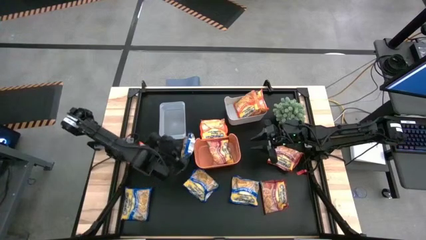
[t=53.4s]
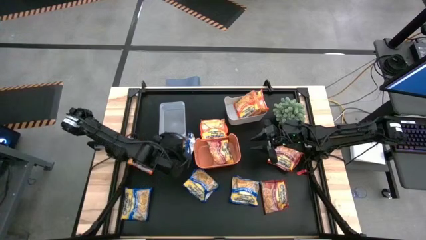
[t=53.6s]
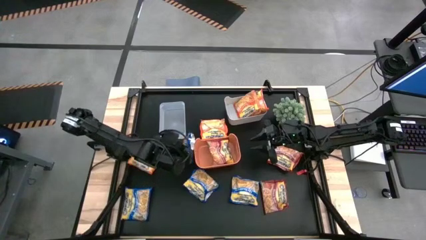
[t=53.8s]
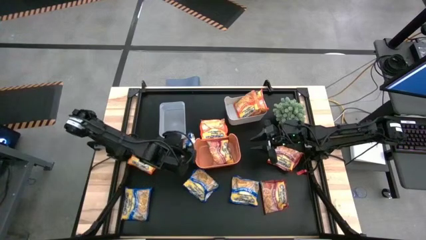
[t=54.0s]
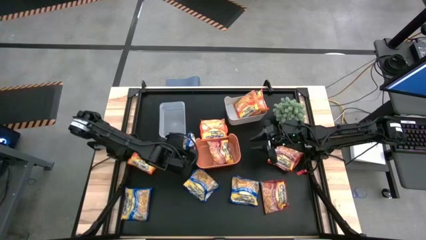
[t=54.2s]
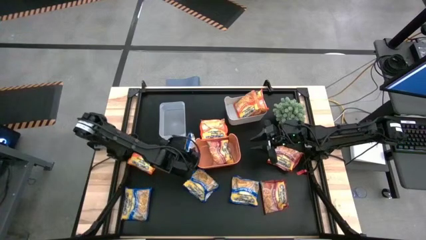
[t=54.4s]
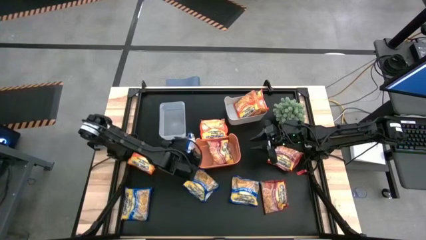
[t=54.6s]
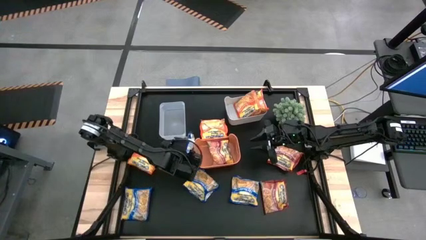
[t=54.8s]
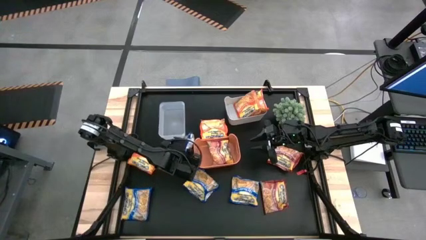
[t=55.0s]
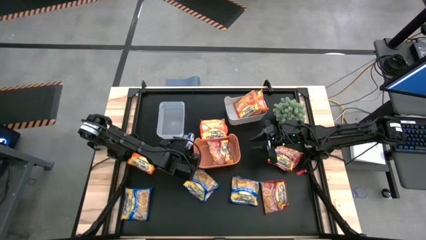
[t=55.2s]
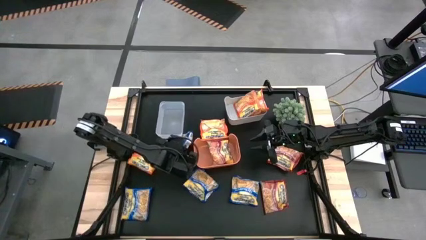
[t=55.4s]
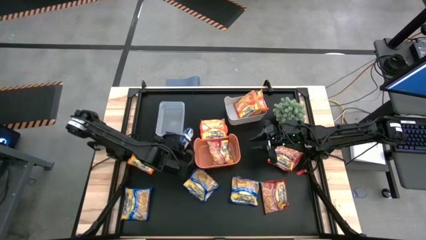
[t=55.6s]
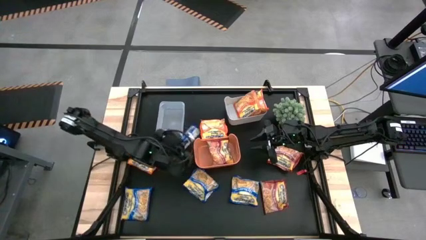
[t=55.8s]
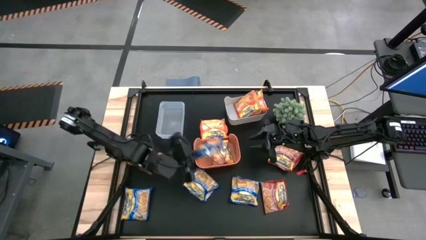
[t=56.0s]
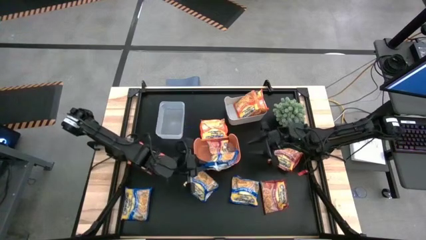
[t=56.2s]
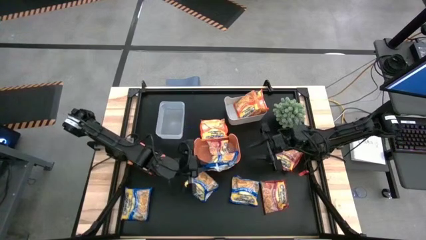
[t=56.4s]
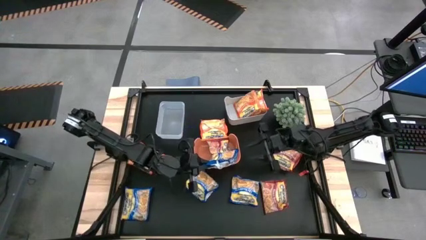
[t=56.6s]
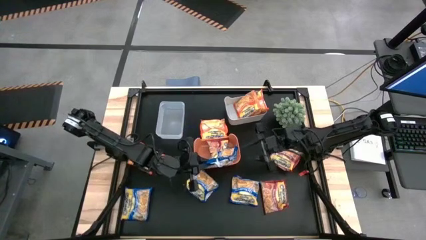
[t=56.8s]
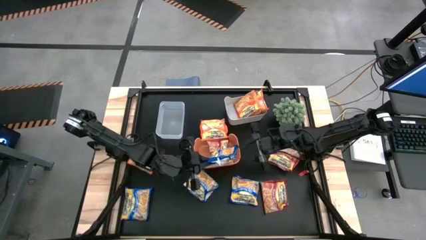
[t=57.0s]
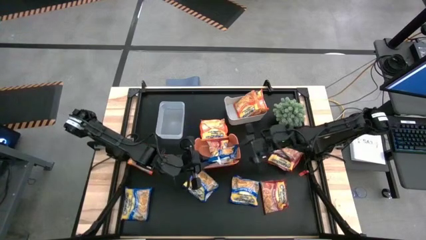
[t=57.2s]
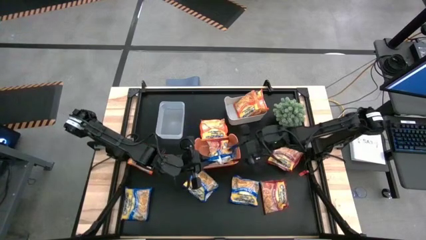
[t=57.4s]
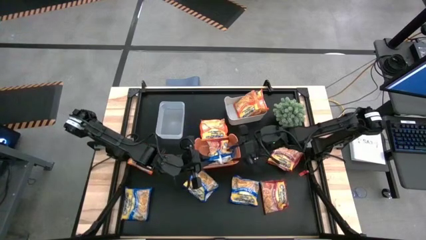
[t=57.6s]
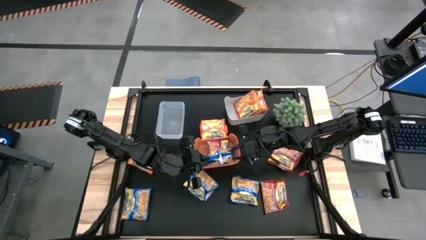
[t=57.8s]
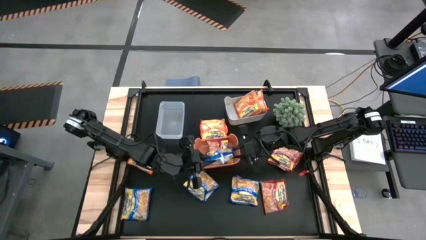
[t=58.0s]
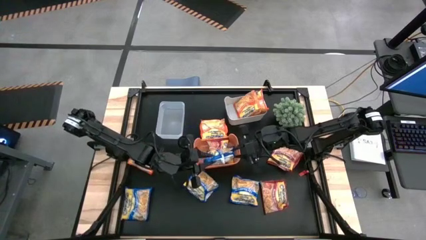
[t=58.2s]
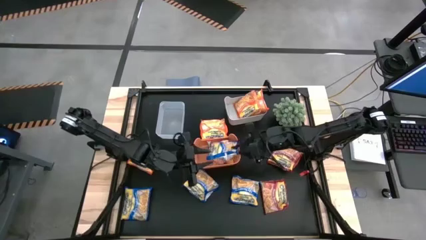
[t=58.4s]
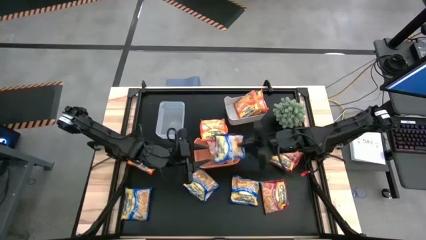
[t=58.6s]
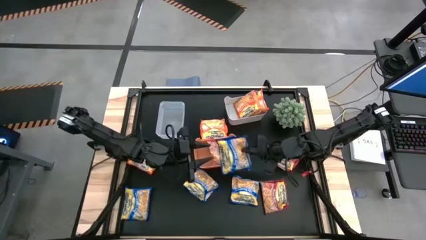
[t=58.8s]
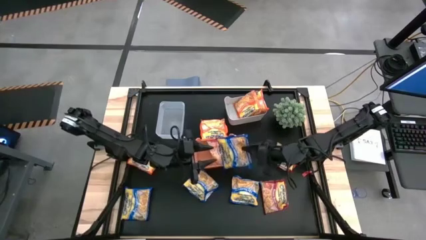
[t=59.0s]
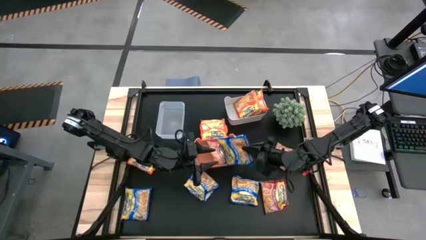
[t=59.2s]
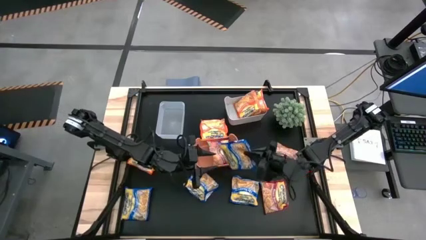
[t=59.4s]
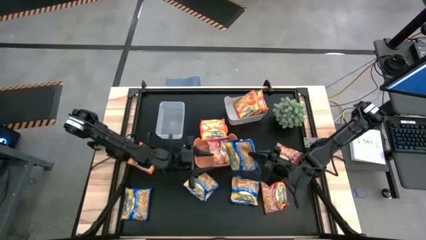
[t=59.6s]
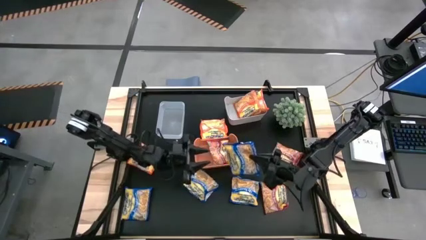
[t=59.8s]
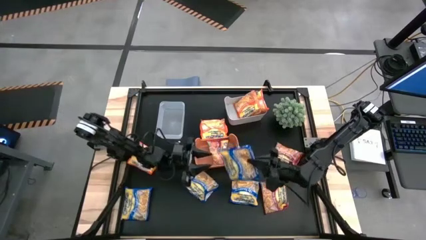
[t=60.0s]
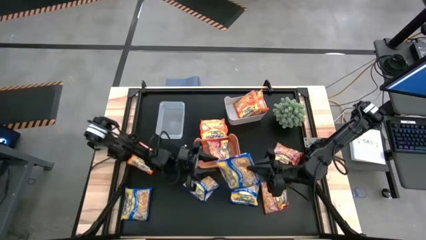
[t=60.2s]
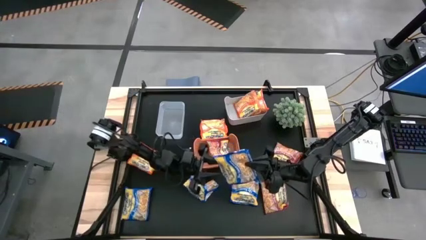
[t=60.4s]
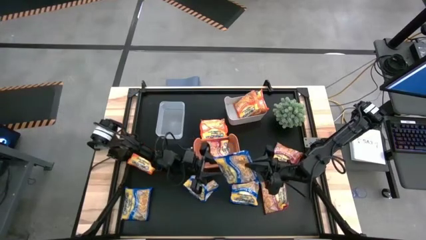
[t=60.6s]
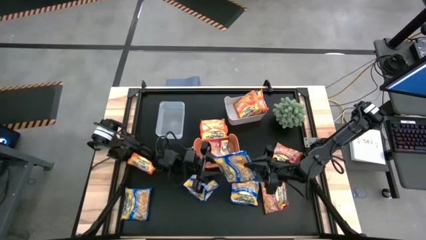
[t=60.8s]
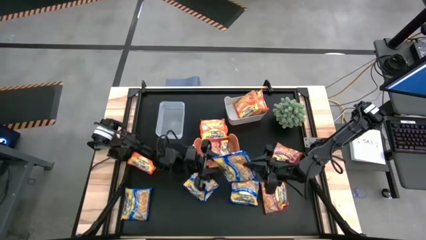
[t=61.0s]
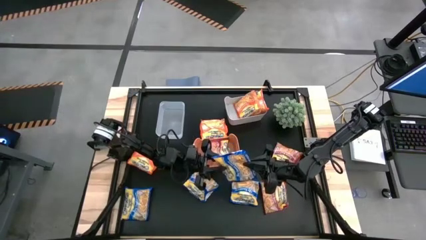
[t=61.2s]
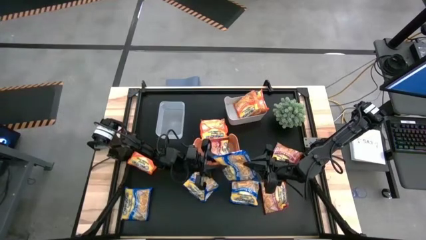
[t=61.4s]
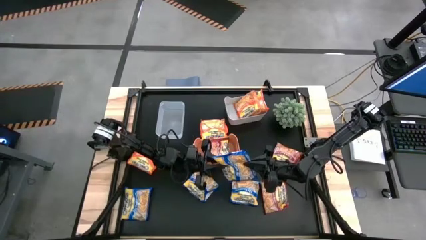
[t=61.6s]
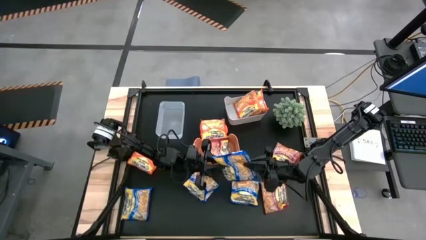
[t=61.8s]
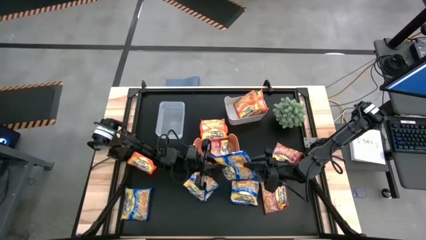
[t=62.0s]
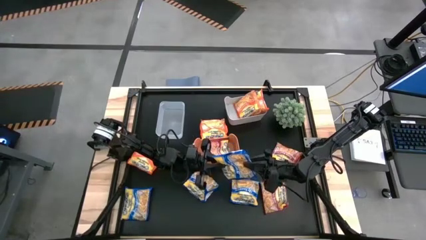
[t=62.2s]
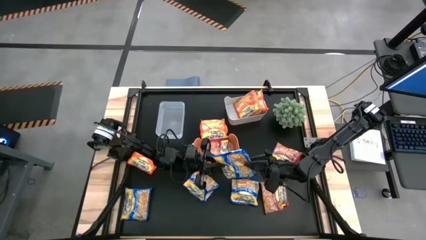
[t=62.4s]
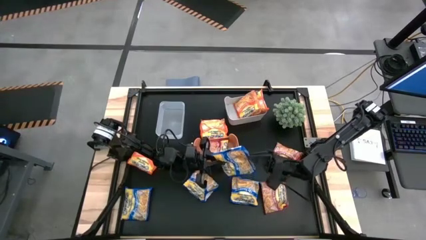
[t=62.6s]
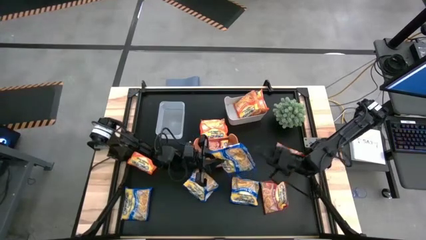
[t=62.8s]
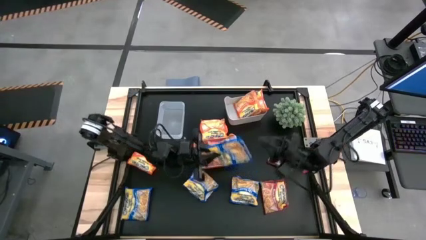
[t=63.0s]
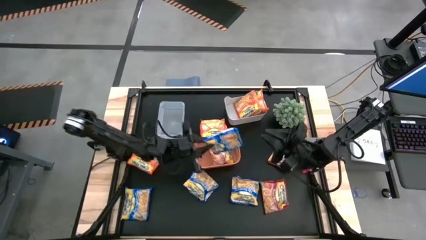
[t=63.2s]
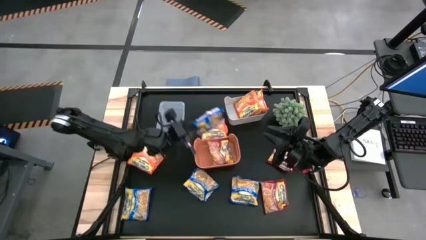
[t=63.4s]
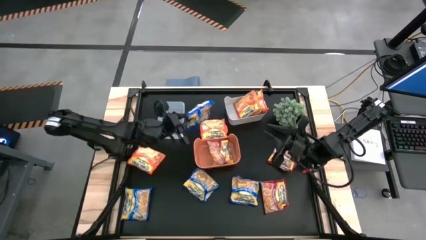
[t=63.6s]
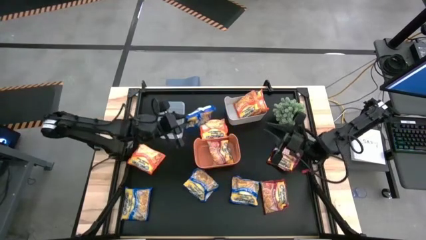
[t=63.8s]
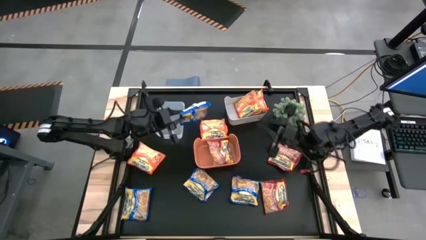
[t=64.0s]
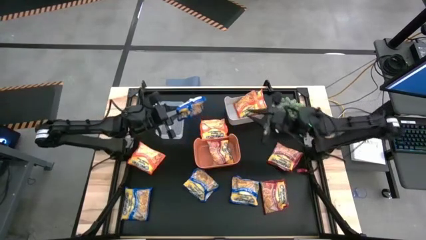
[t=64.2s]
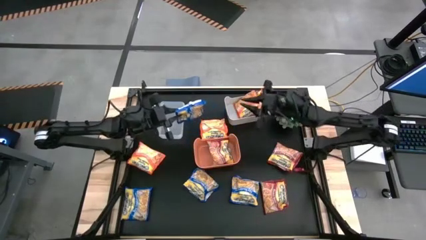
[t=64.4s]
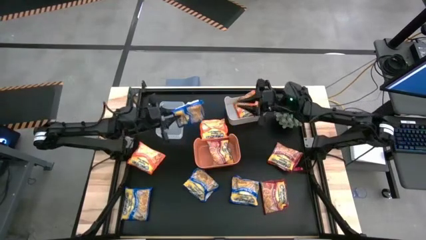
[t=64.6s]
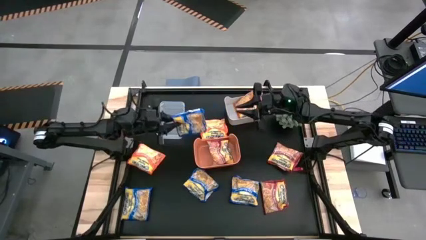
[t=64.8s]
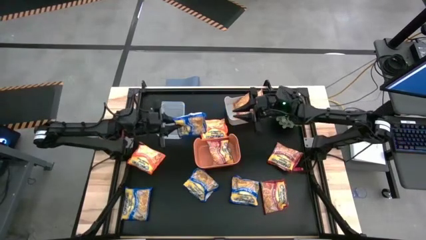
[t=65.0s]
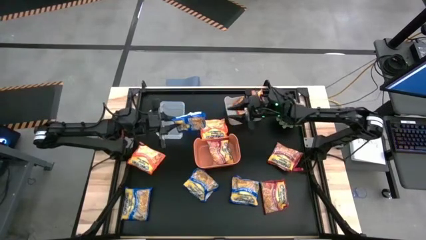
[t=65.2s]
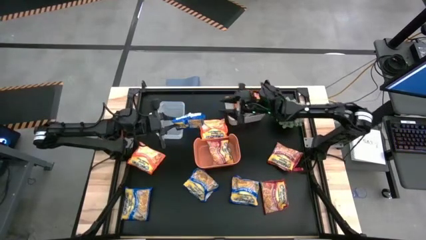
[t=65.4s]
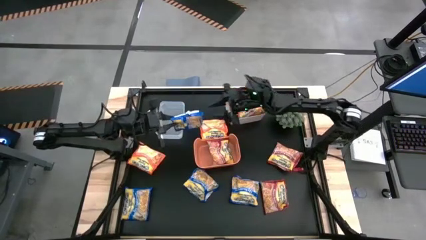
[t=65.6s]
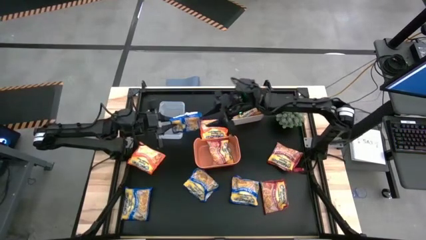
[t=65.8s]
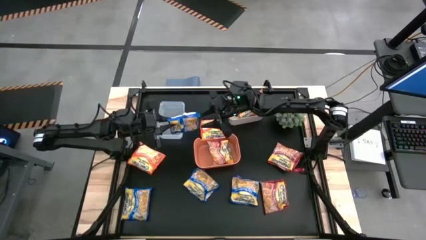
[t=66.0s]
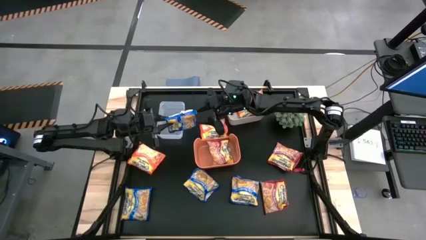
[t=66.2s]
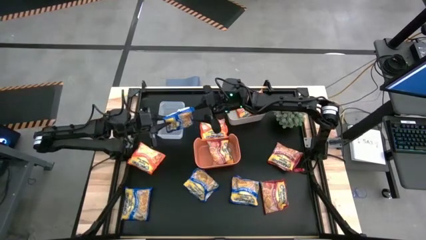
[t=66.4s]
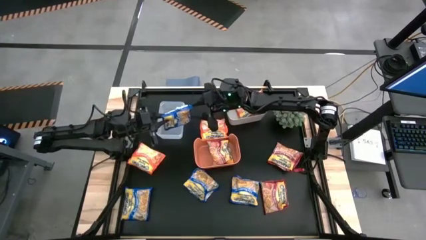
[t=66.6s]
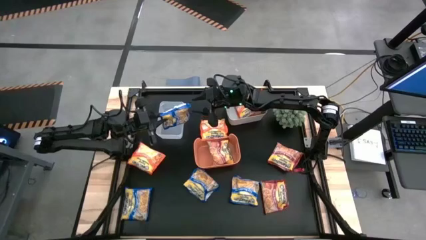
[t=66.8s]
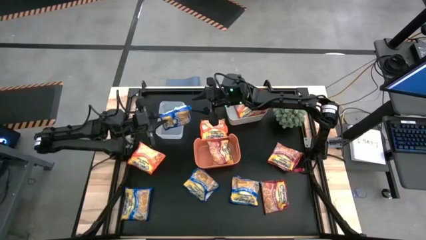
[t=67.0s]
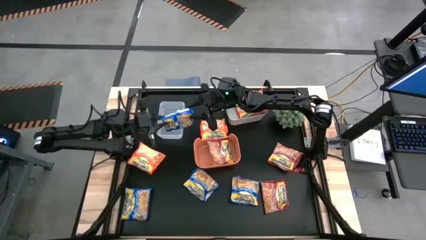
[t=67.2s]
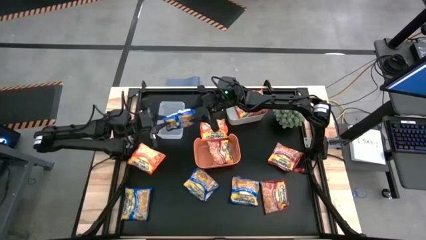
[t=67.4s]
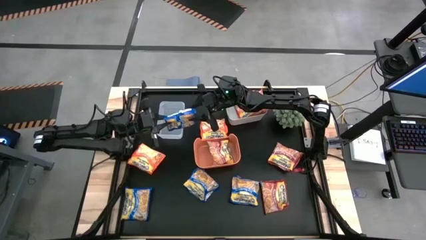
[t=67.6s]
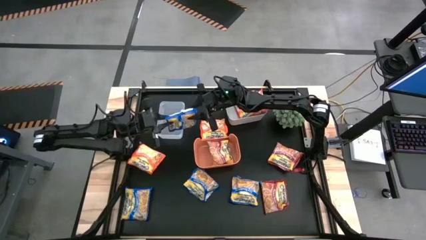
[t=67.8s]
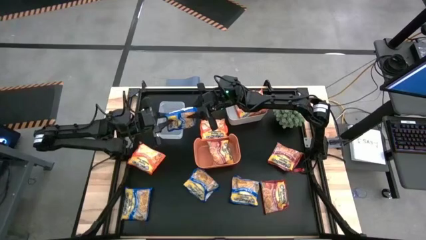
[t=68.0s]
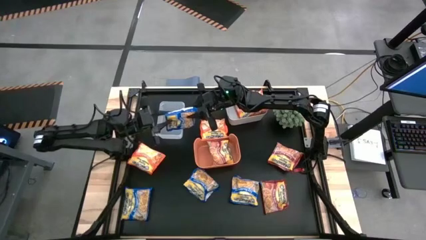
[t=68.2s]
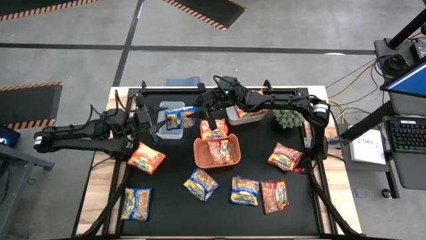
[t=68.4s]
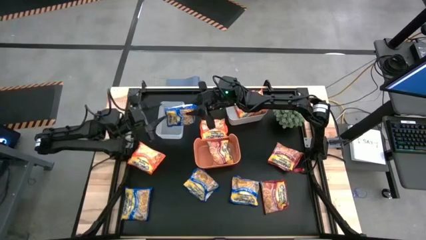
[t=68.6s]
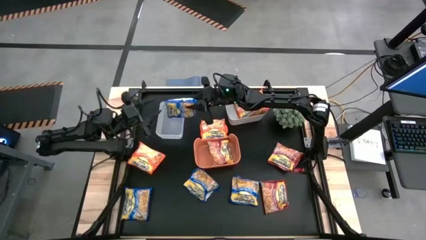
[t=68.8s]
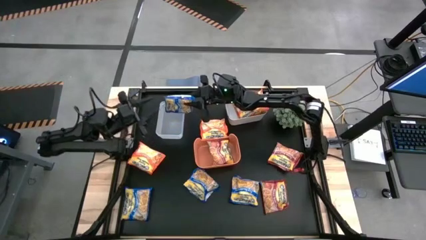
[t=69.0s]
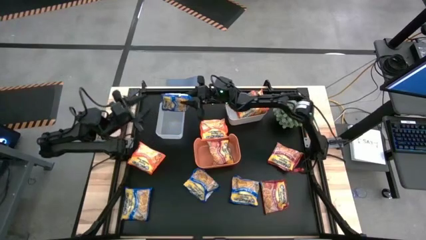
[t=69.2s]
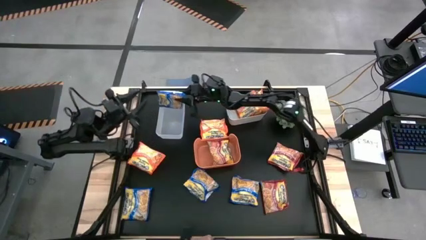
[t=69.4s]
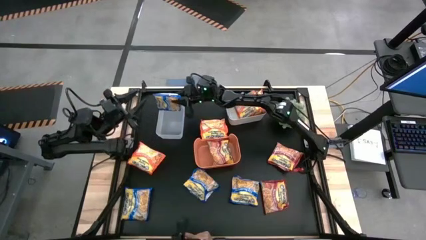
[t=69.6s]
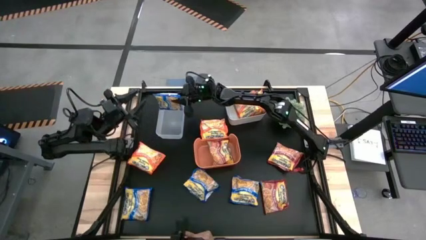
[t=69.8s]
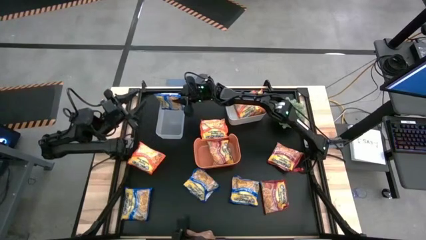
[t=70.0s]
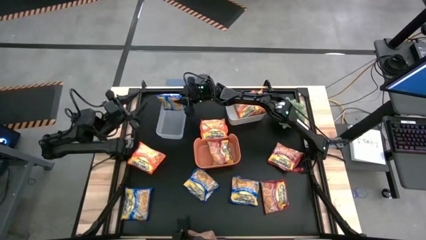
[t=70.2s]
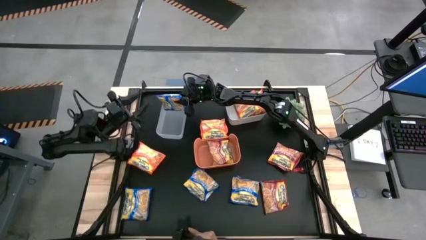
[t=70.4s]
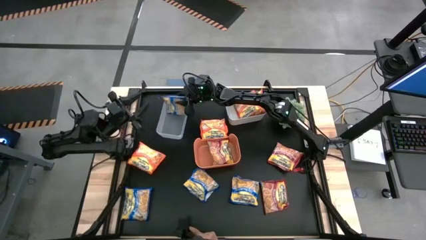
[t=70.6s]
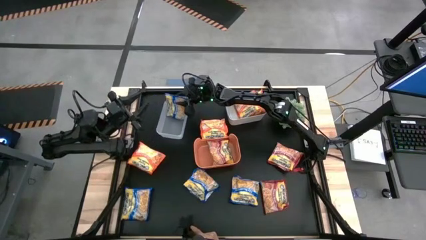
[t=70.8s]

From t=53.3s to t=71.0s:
Task: Sort Maruchan noodles
Put the blue noodle packet into the transparent bin
